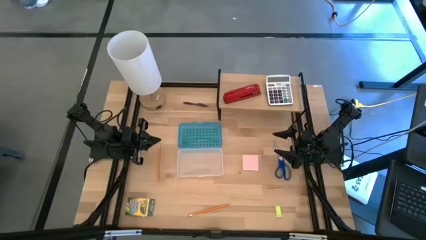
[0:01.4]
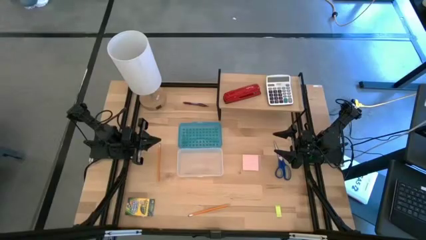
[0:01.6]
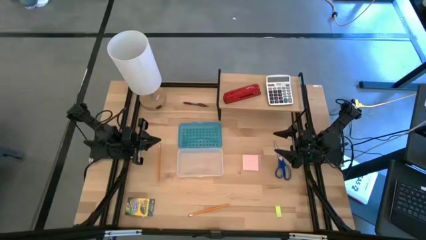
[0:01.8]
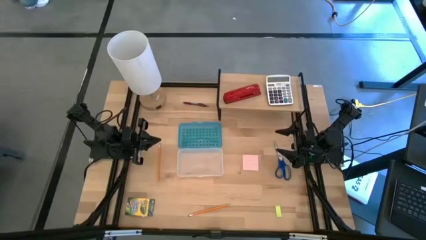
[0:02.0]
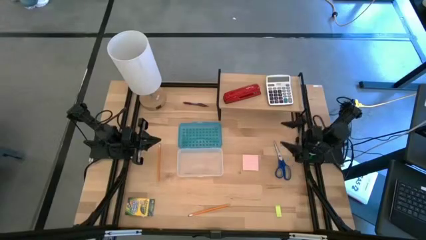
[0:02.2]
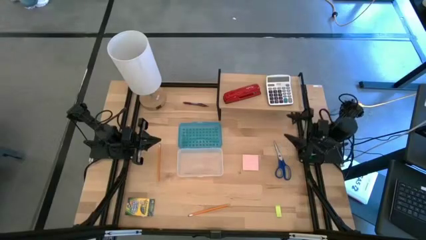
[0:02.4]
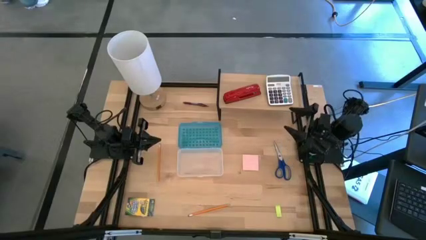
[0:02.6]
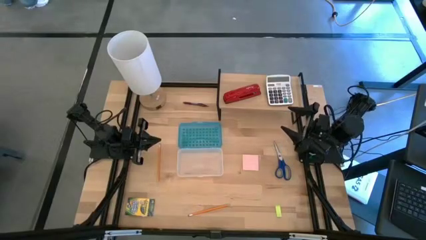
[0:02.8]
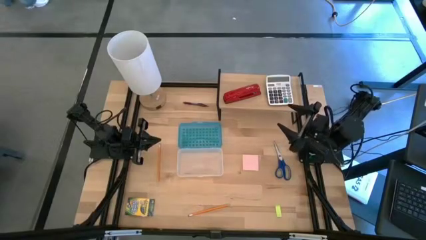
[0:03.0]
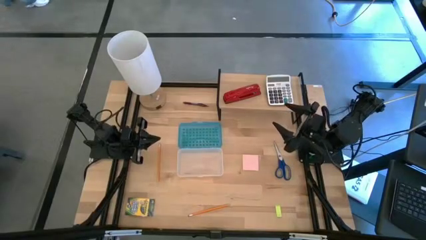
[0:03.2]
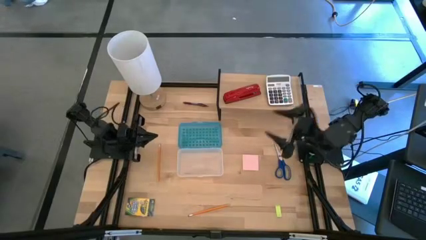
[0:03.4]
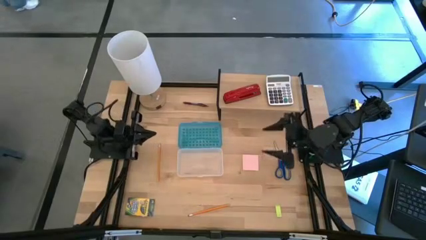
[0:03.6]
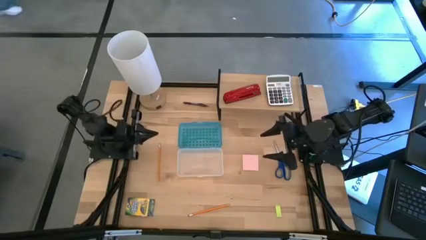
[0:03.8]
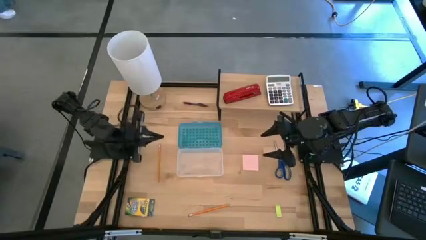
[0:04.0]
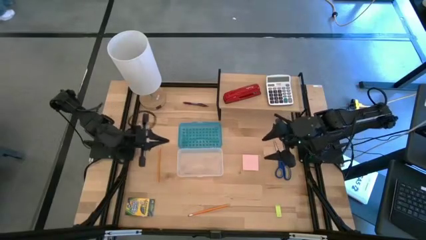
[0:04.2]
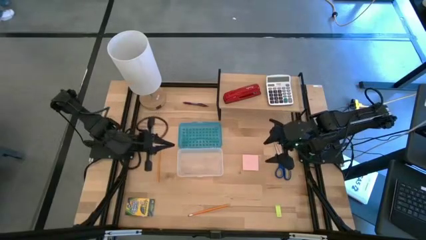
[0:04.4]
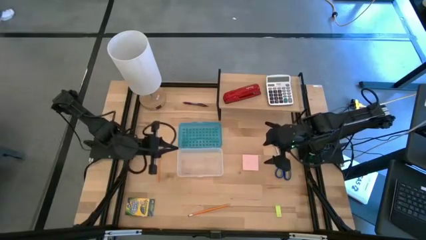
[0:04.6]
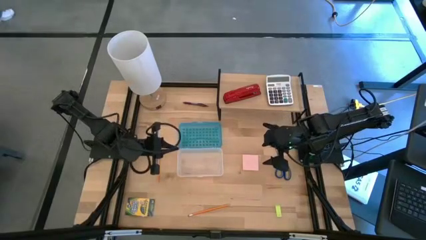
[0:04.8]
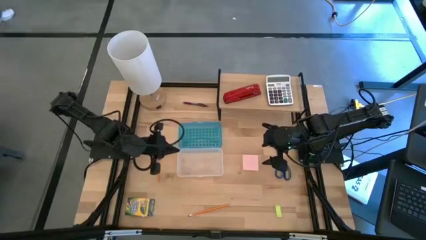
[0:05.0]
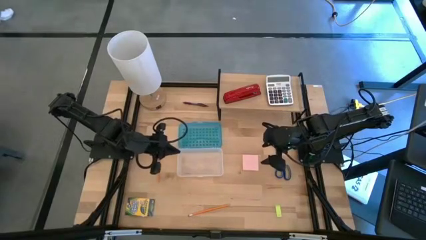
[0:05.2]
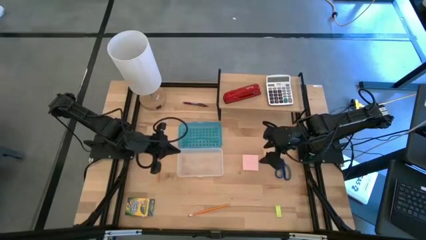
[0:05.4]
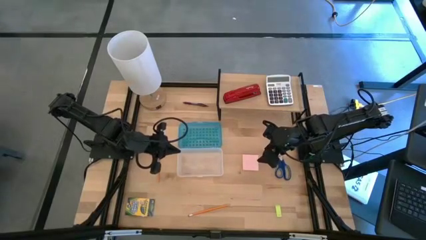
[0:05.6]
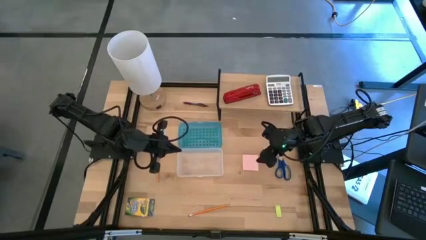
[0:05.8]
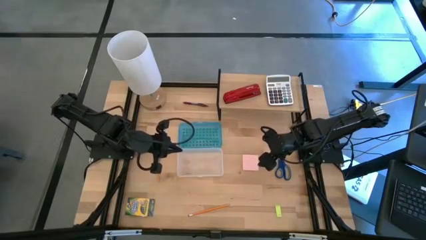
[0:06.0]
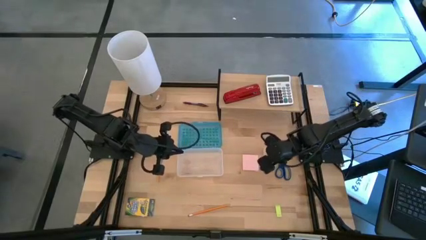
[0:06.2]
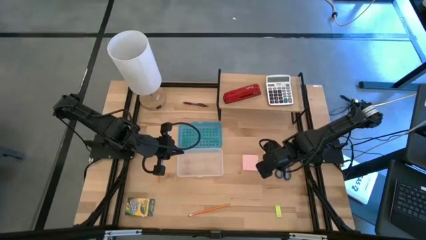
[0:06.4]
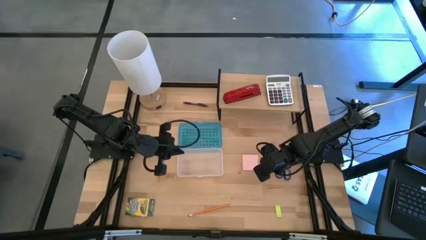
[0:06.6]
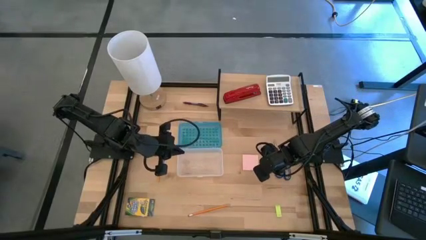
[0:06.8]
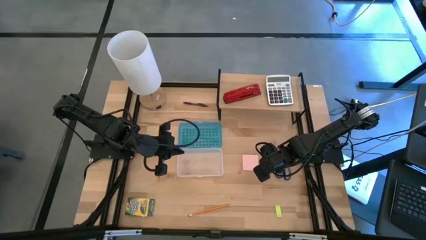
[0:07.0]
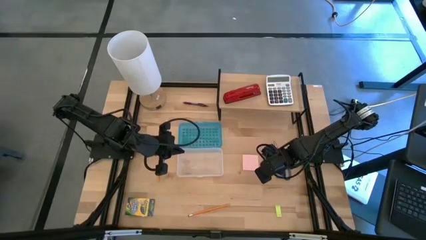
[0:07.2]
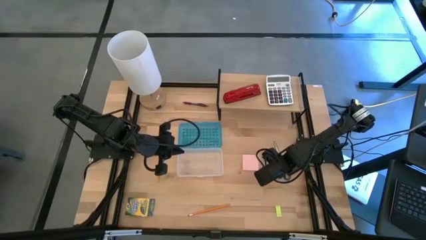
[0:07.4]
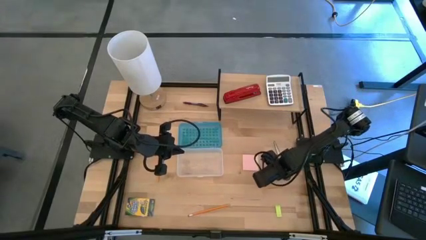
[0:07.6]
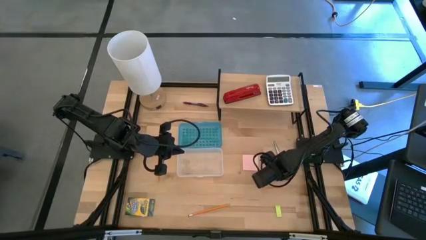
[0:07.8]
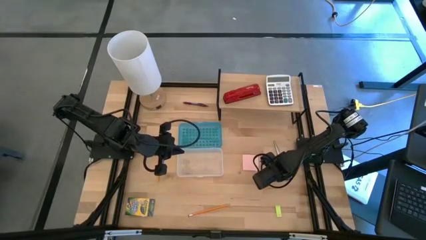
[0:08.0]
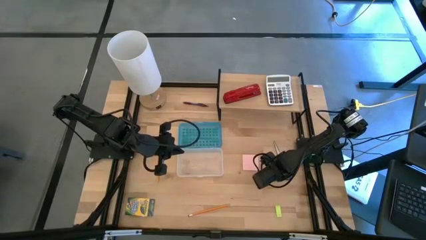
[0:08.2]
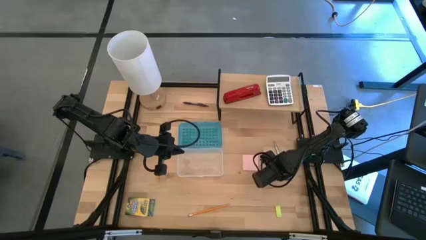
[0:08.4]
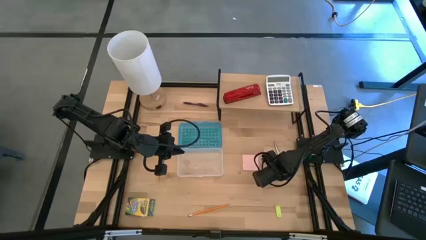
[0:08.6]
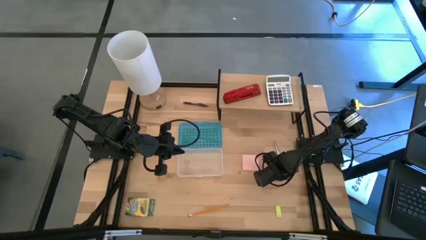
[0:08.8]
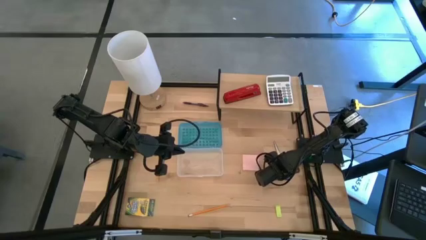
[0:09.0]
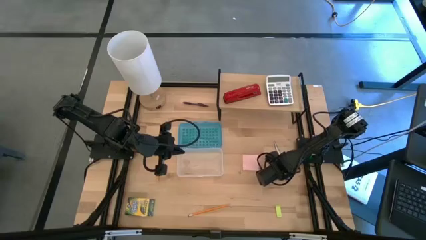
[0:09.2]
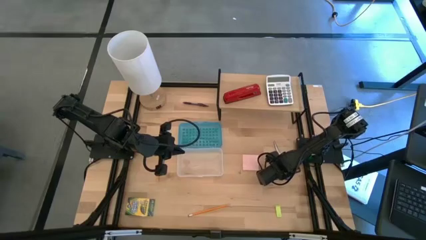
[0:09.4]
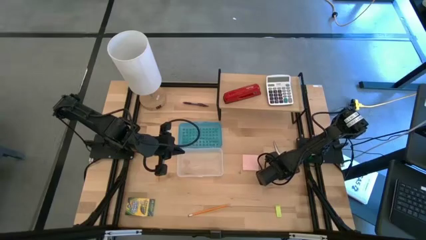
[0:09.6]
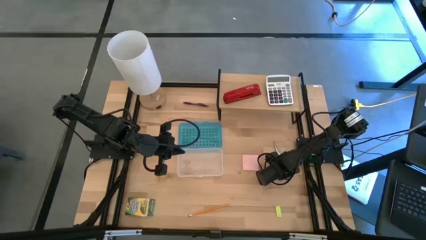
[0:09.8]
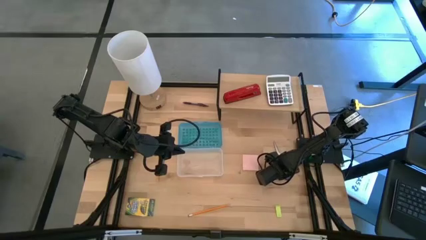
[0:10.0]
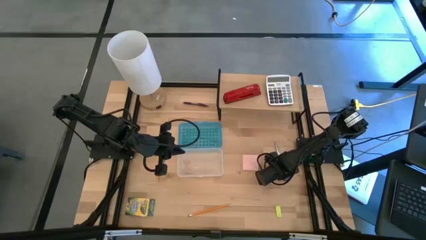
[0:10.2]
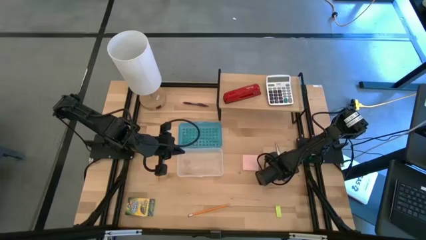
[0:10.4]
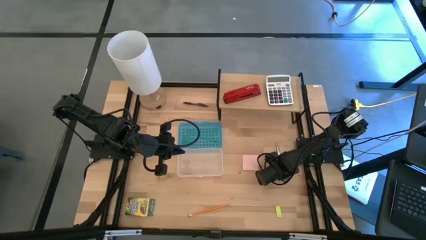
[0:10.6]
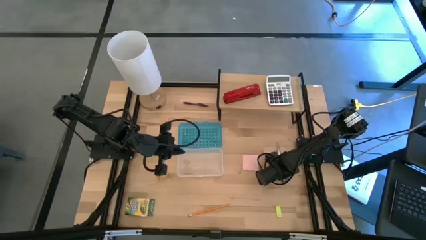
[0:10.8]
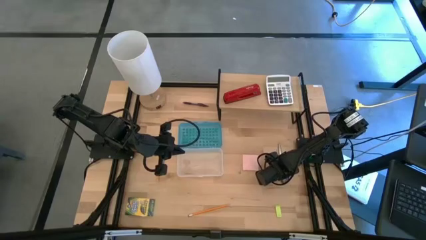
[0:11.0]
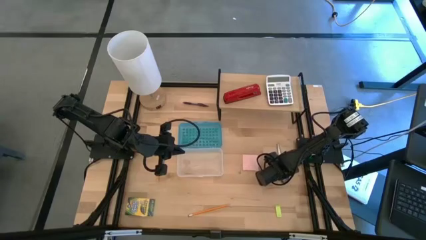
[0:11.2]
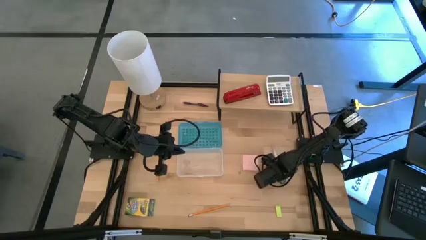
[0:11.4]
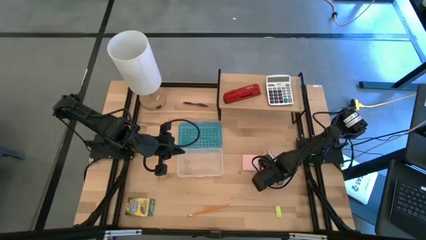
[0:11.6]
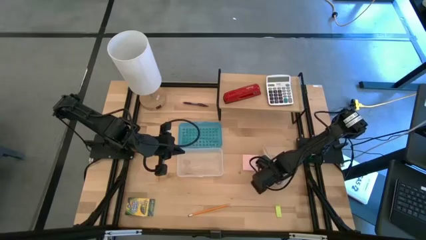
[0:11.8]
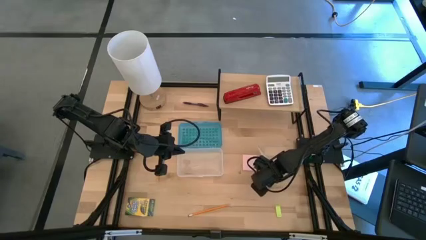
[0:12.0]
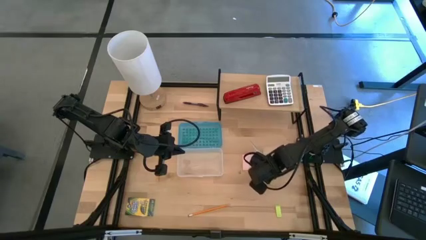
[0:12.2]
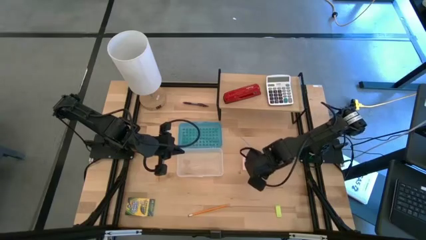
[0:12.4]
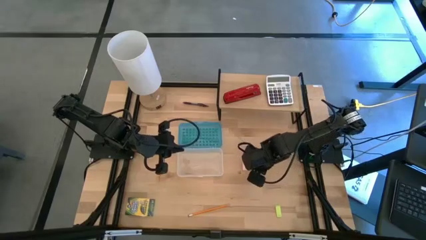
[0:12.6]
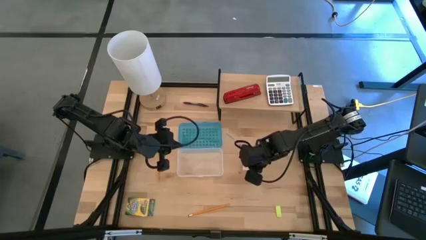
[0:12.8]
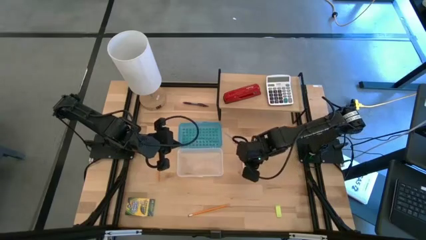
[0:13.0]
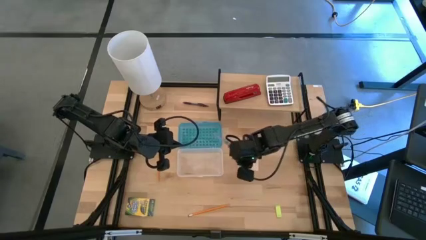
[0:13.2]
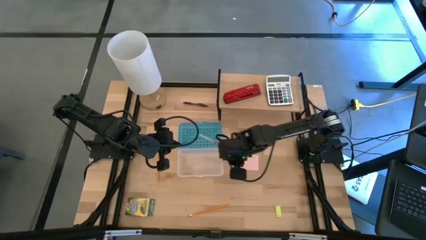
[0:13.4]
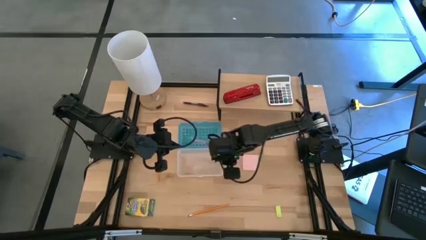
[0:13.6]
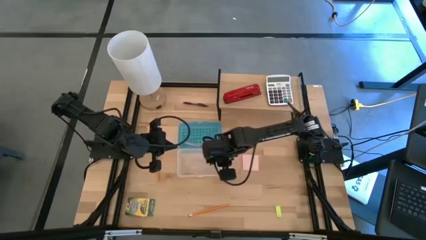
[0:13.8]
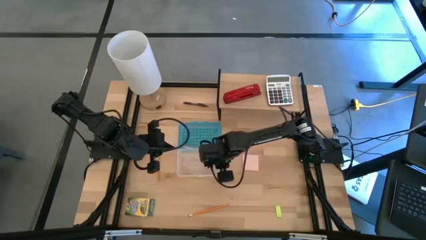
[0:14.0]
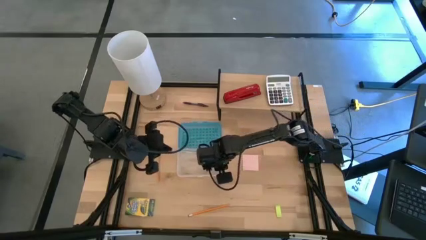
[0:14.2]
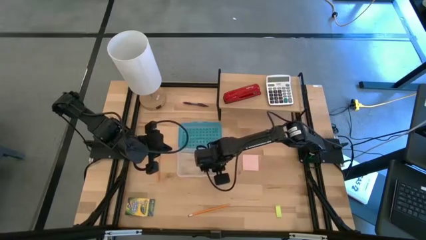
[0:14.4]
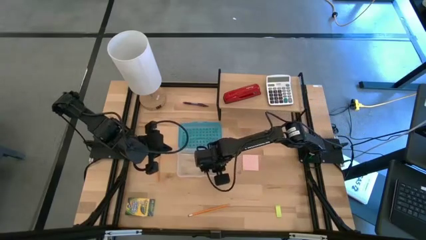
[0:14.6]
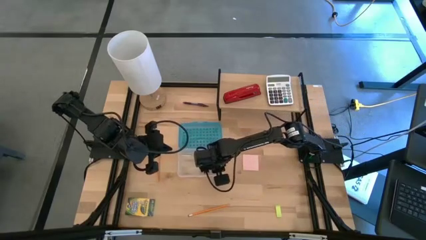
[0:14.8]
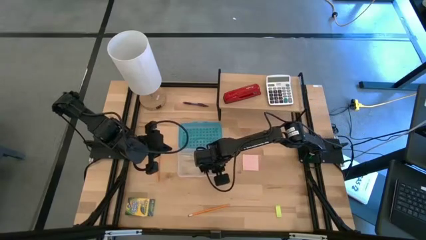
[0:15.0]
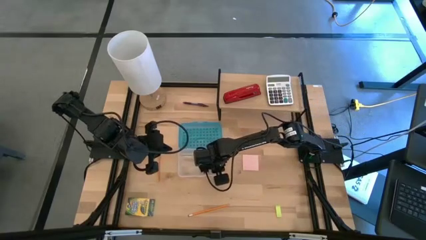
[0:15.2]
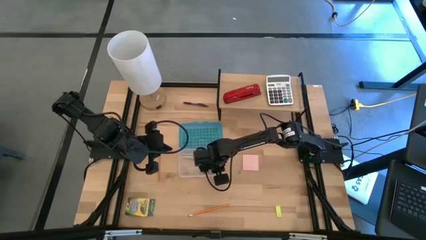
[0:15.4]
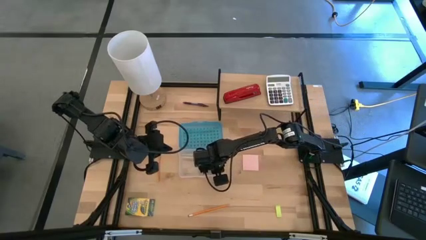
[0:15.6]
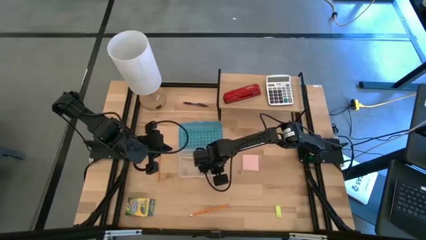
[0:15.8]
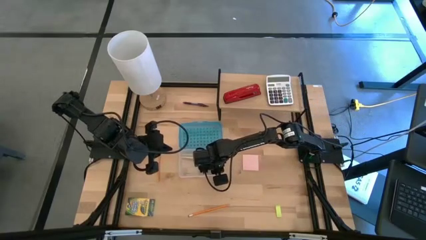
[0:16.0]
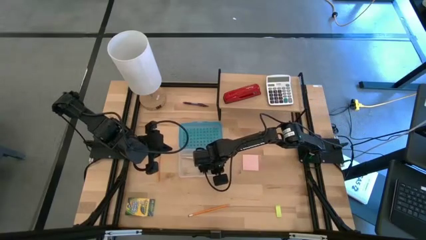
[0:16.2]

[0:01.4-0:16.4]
Task: Pack school essentials
Put the blue scissor into the blue supply box
